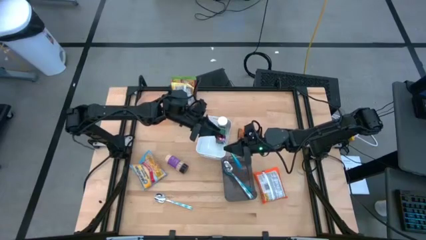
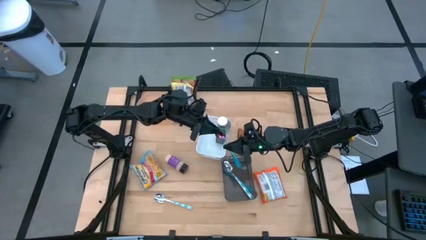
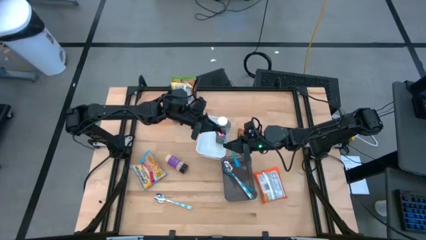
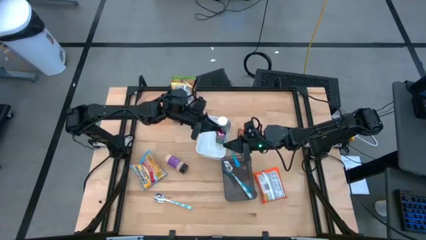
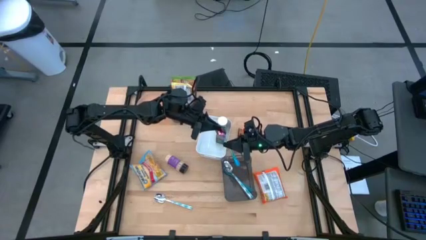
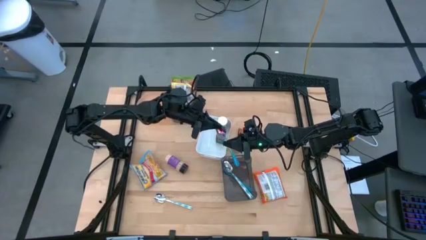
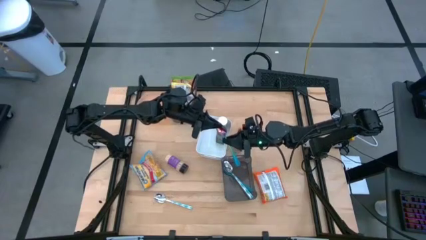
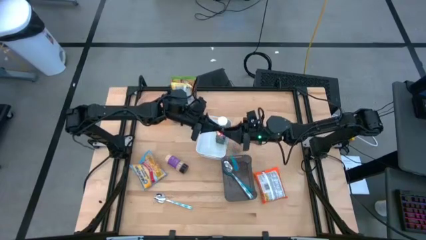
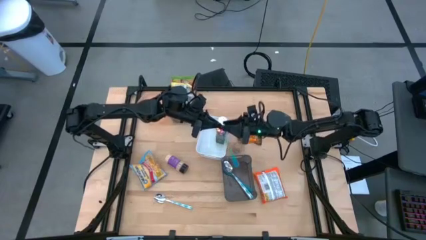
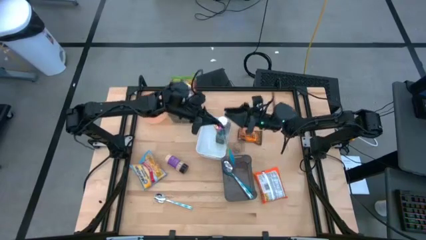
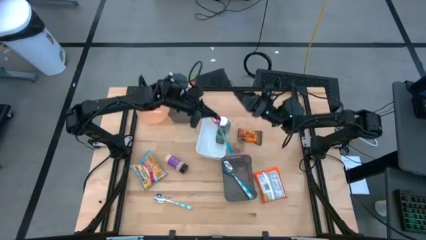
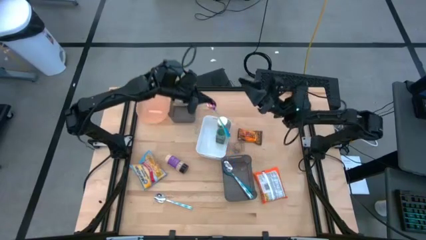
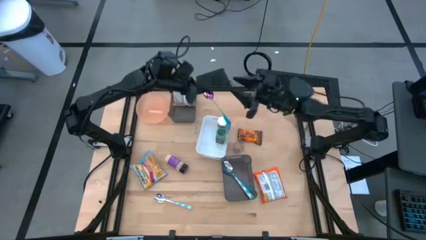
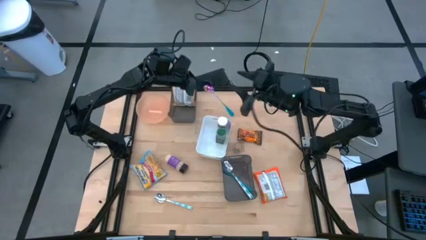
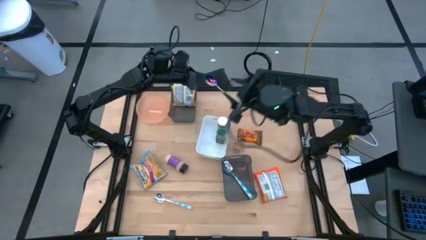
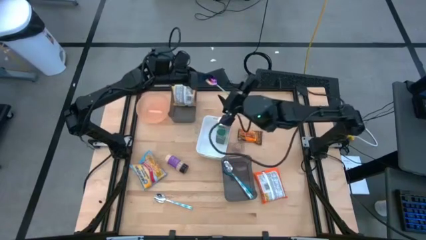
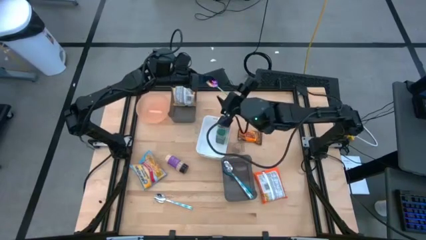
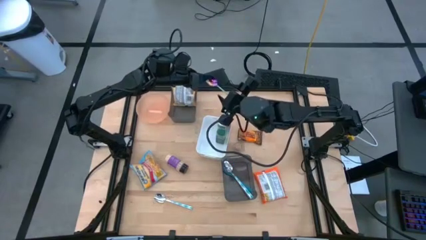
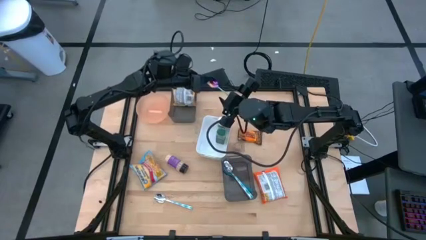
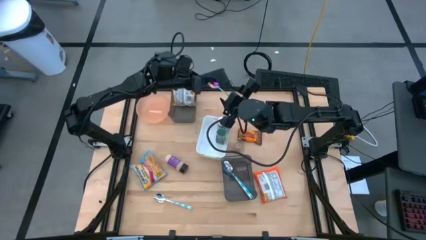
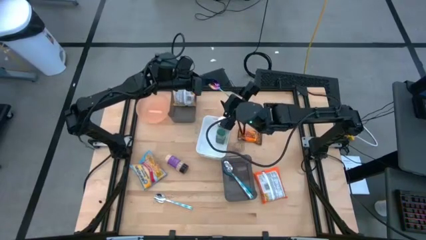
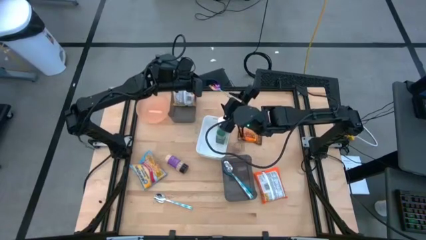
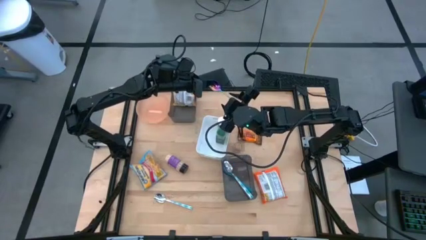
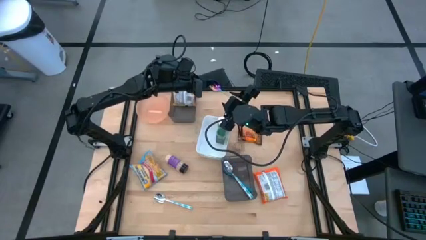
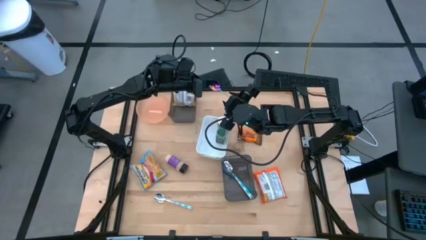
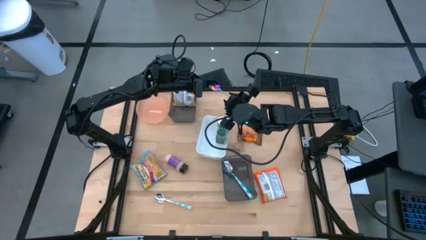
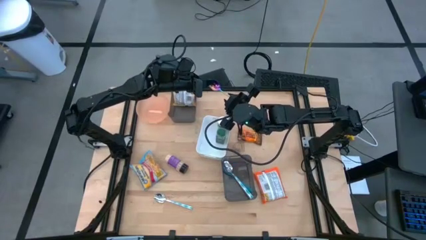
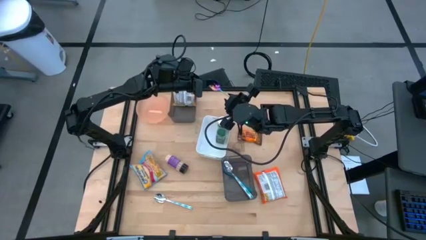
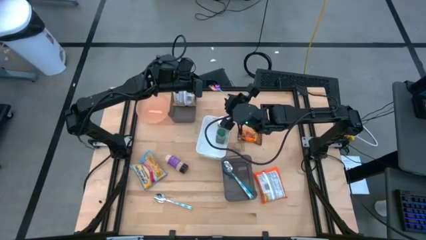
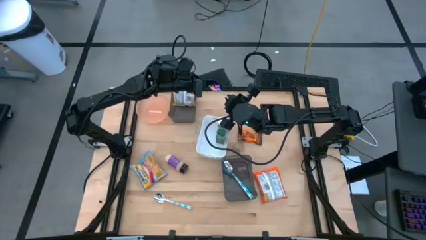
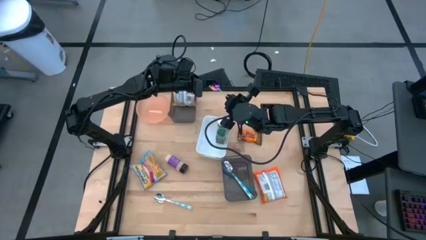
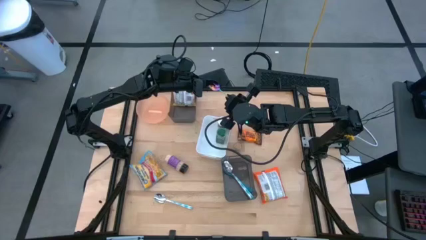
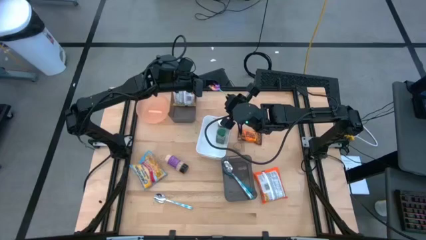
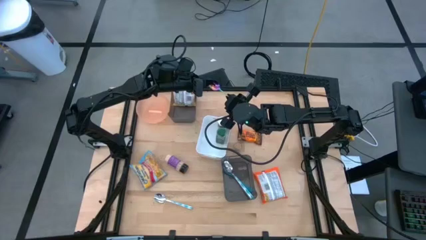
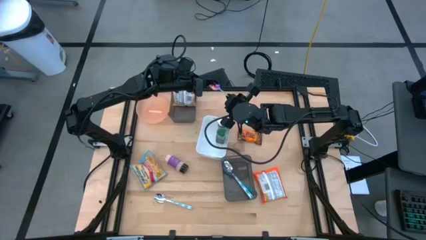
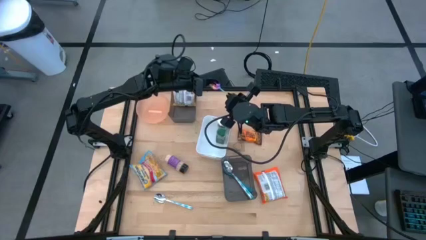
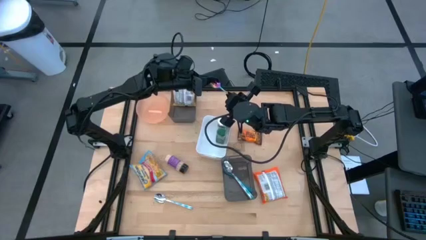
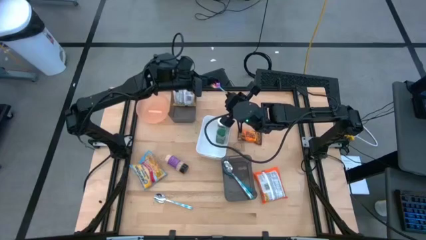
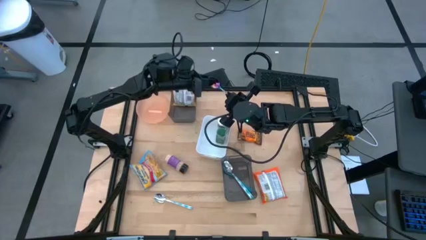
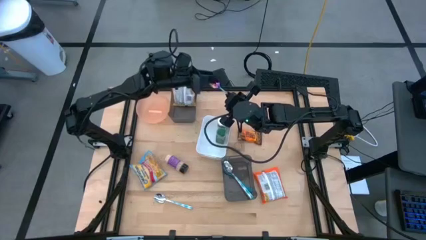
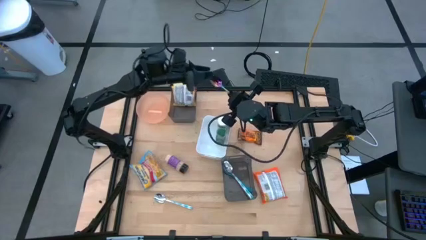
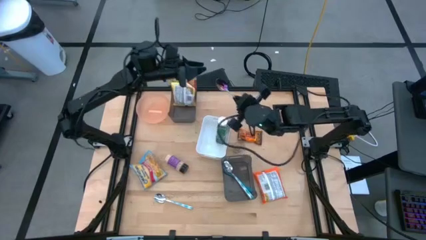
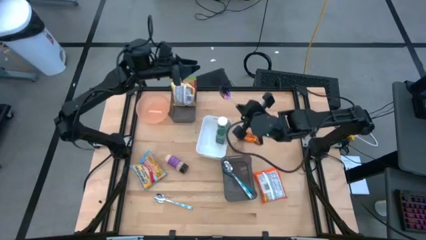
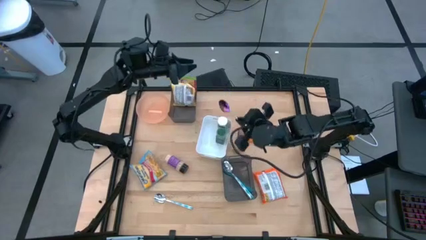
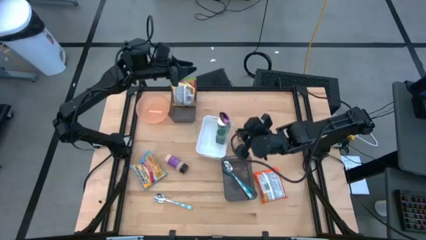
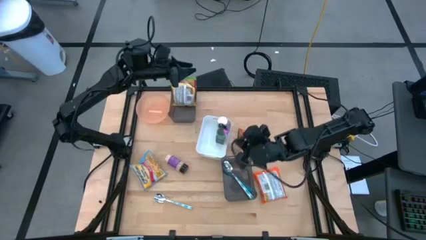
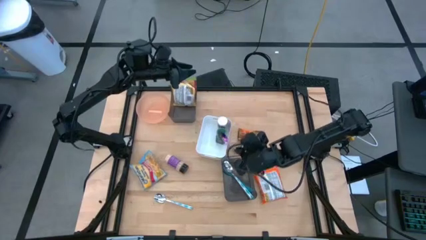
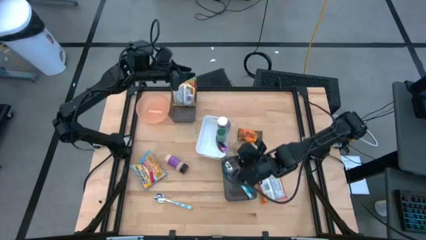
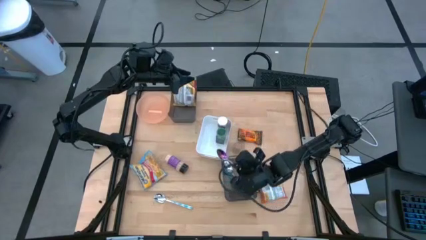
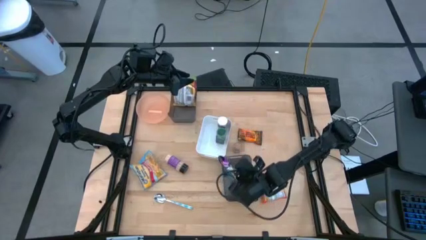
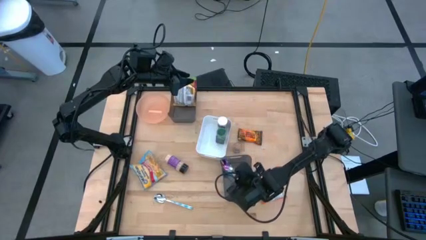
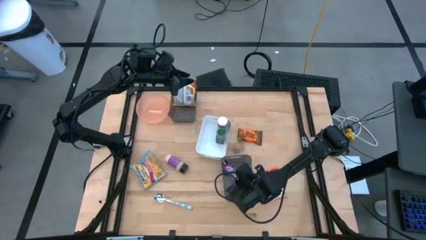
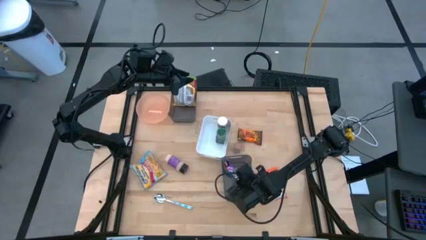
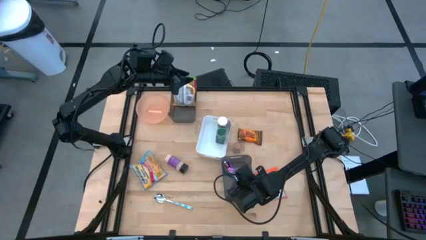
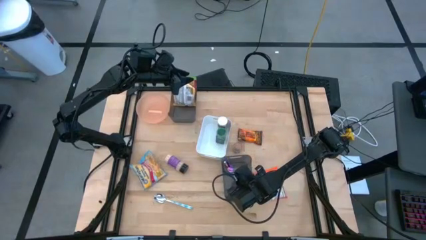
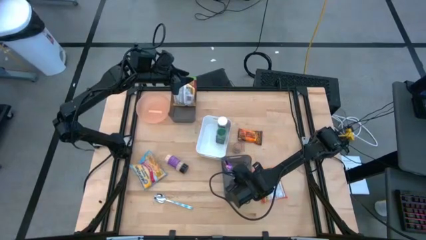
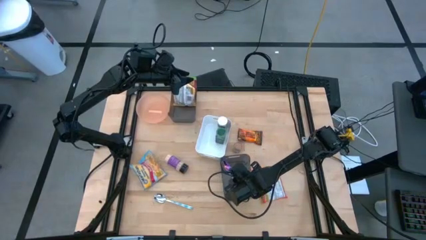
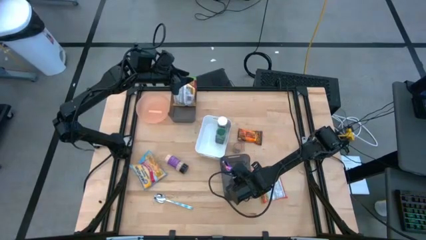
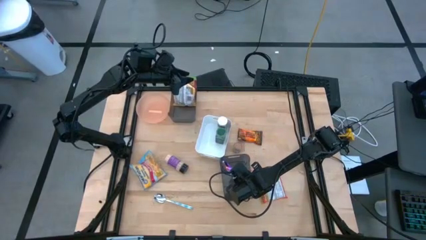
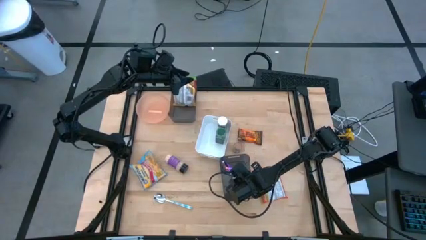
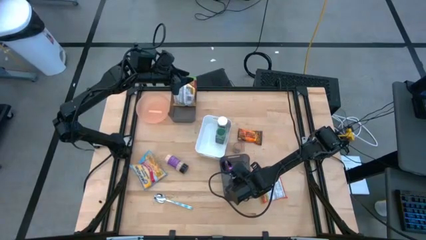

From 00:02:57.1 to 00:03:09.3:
Task: Pick & Place Food Item
Put the purple and green spoon into the bottom black bin

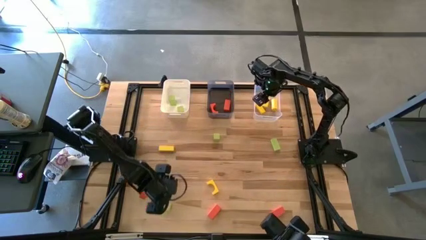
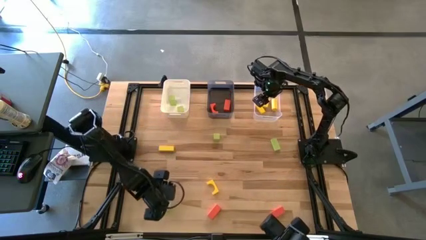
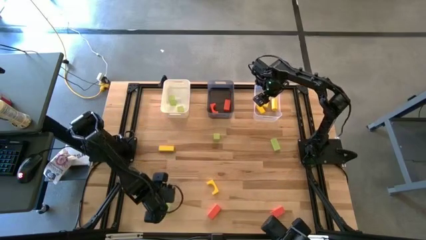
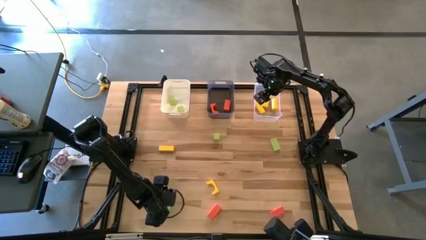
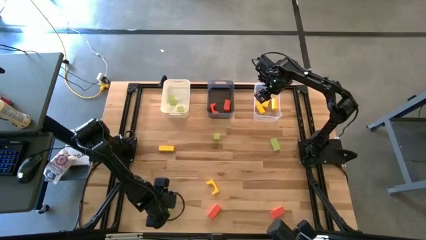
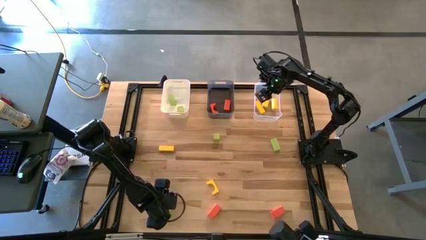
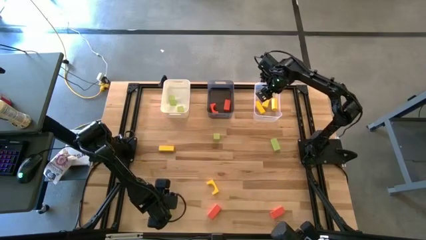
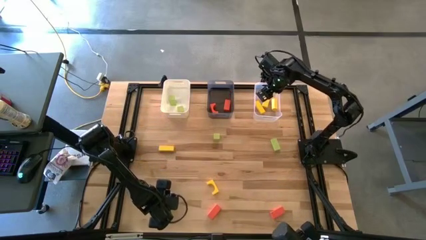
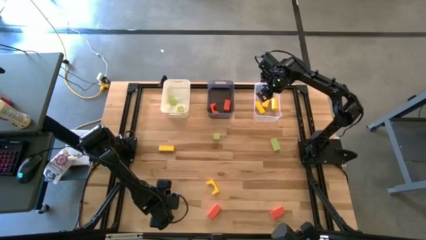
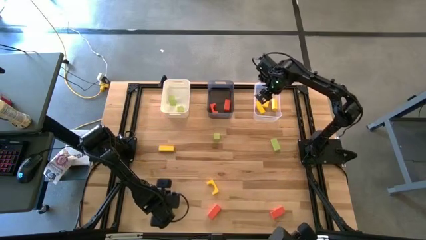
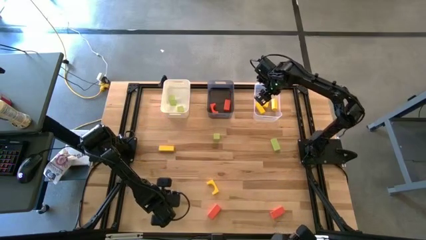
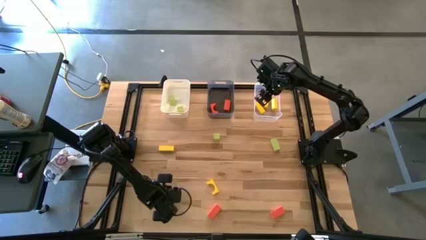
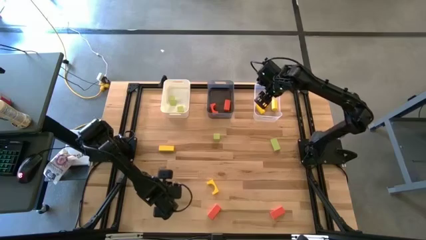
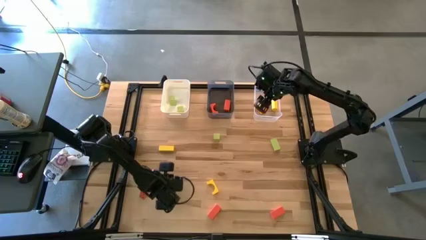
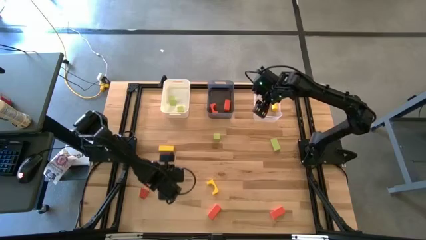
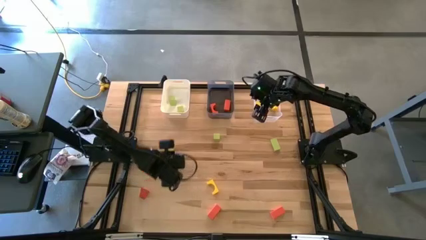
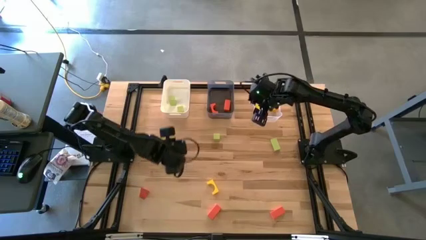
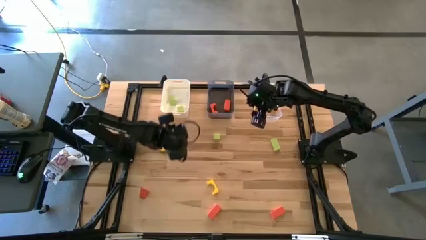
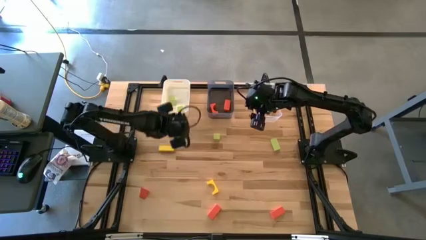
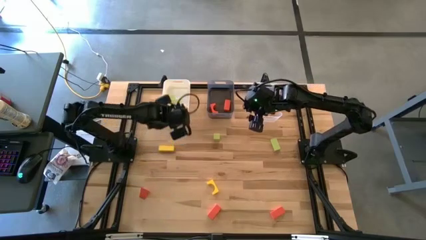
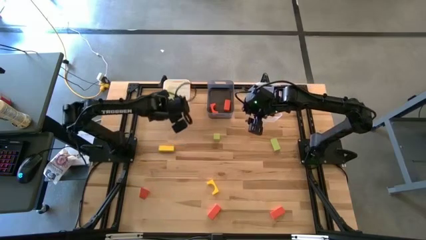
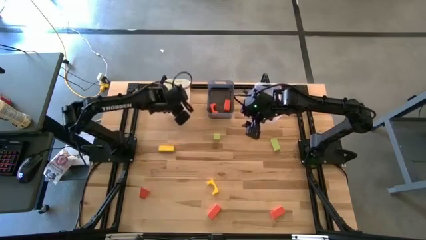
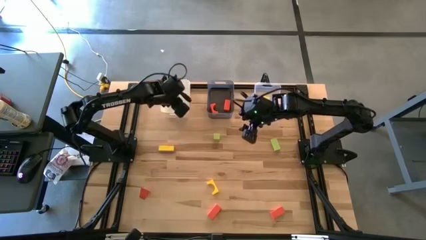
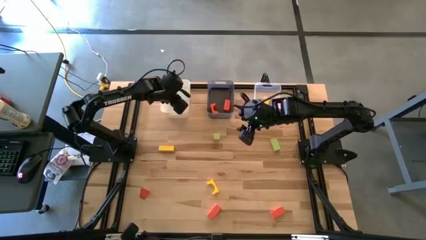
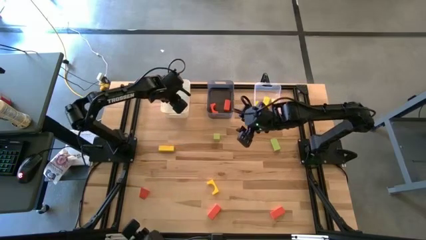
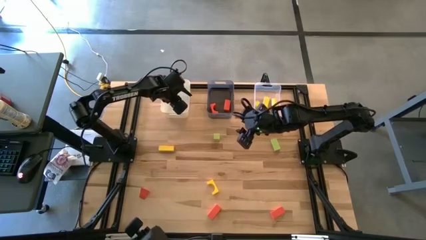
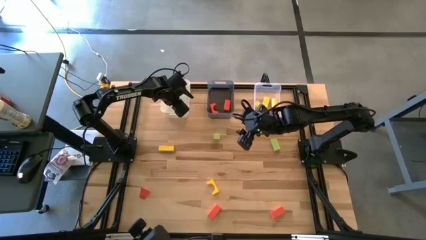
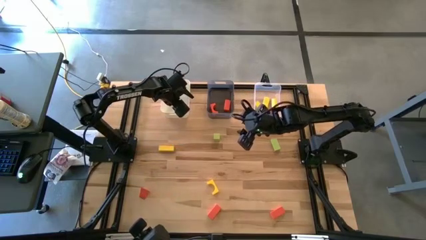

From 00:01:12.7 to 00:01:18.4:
Task: Sort & place blocks by color
Put the green block into the white bin
